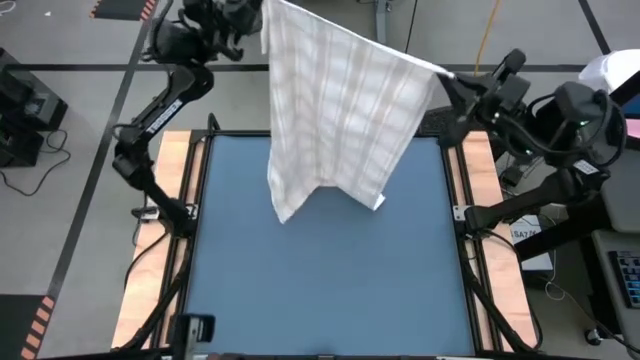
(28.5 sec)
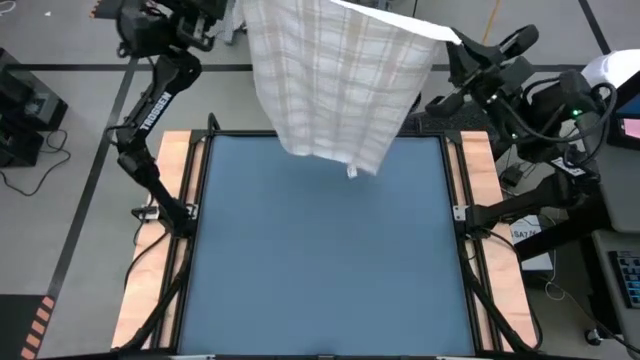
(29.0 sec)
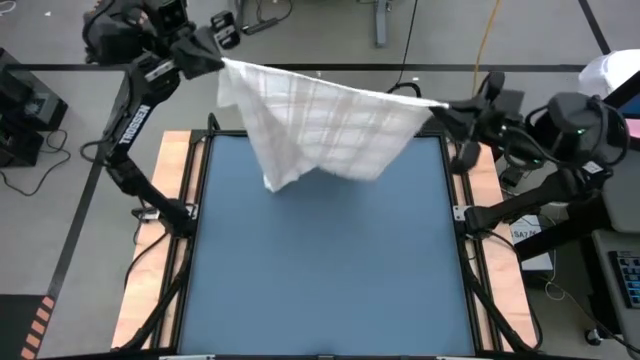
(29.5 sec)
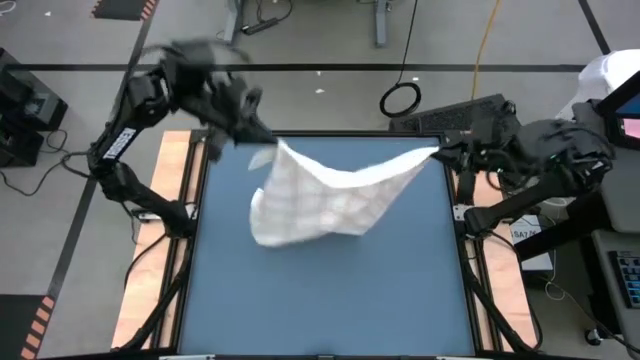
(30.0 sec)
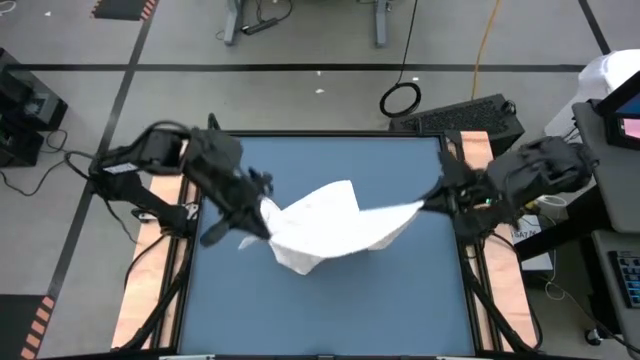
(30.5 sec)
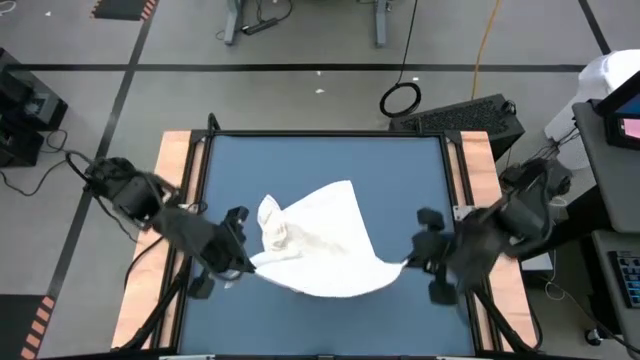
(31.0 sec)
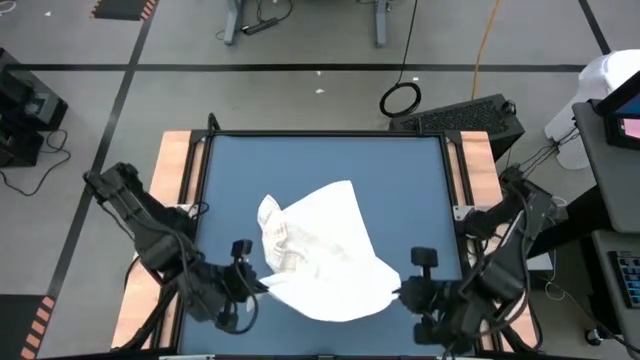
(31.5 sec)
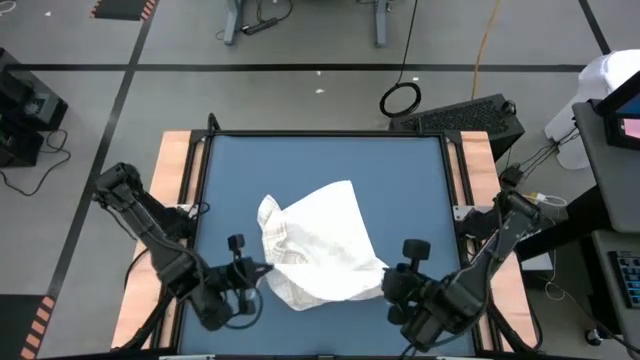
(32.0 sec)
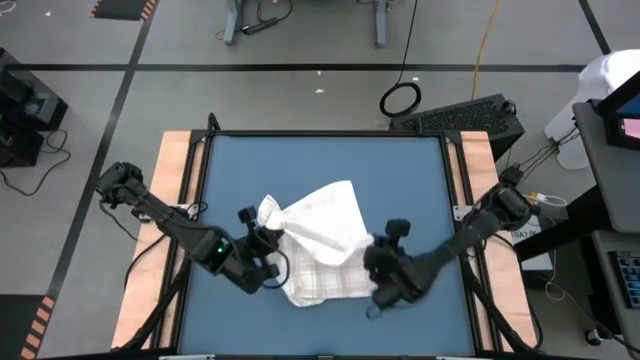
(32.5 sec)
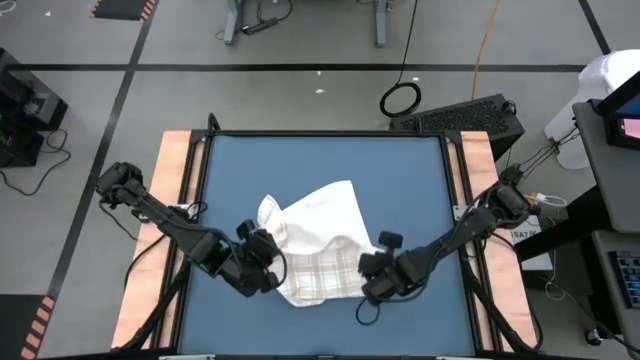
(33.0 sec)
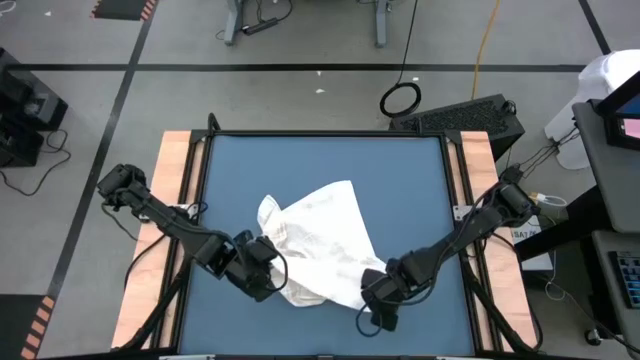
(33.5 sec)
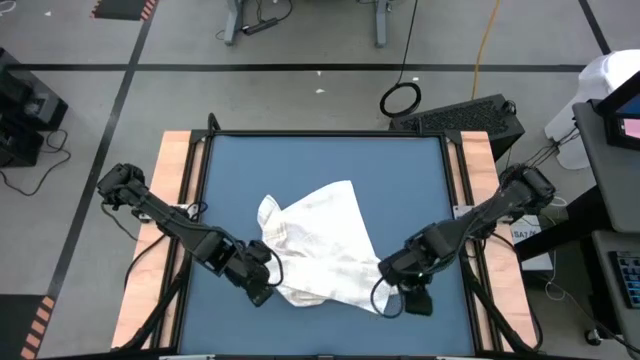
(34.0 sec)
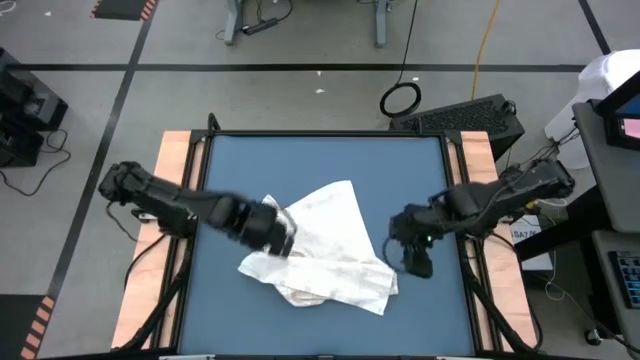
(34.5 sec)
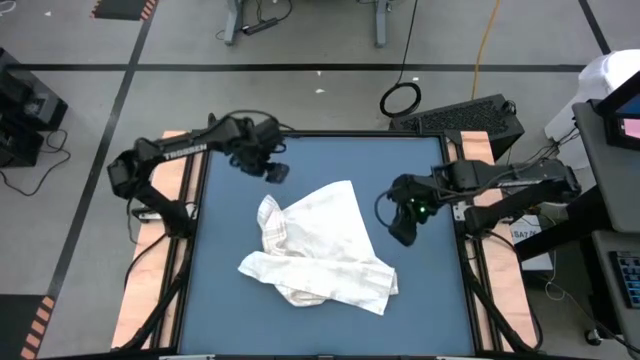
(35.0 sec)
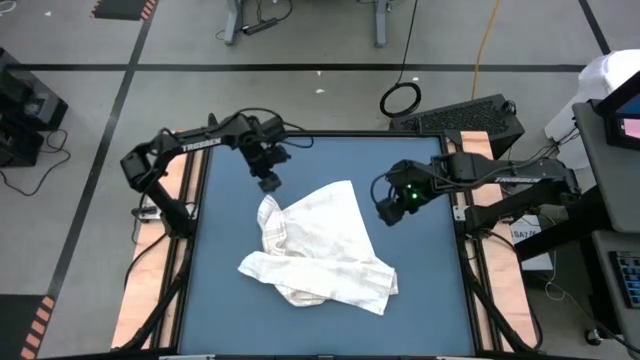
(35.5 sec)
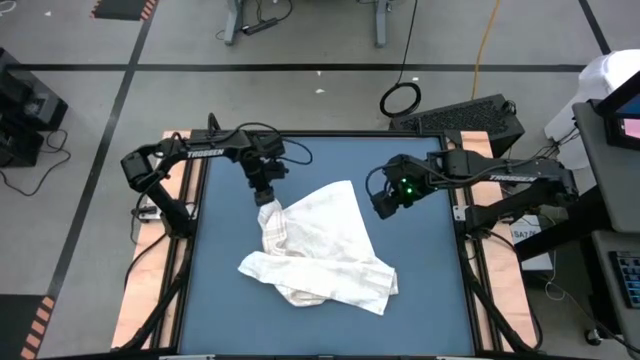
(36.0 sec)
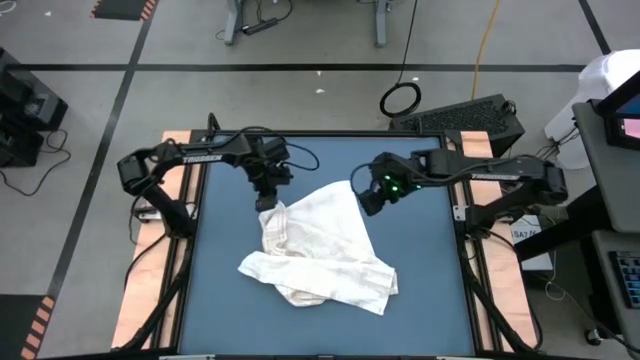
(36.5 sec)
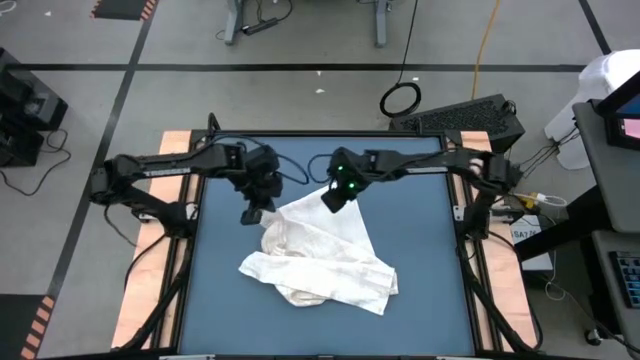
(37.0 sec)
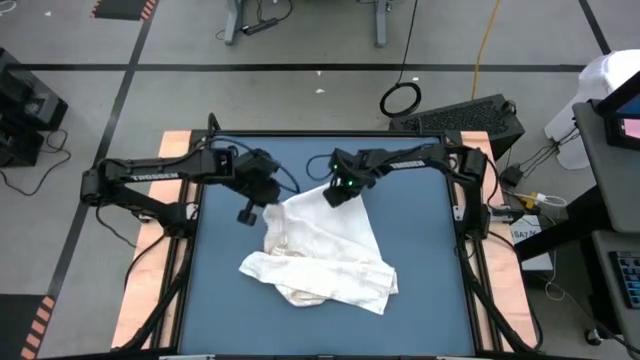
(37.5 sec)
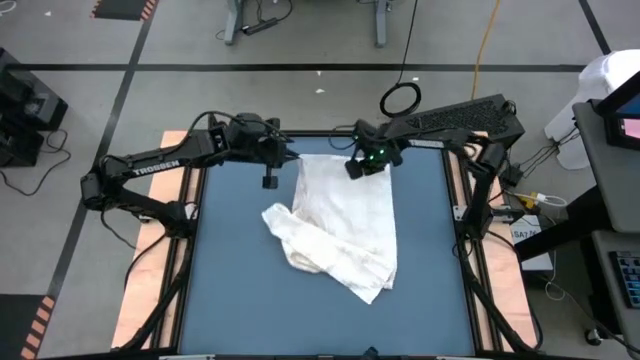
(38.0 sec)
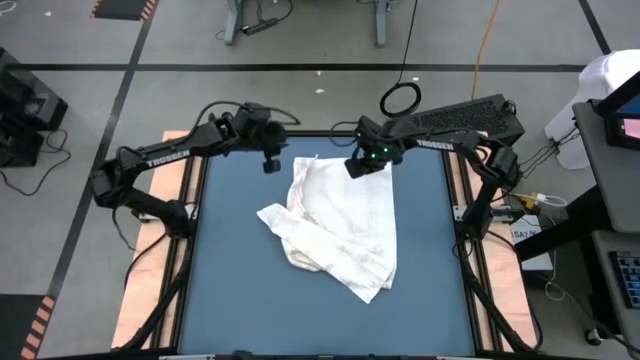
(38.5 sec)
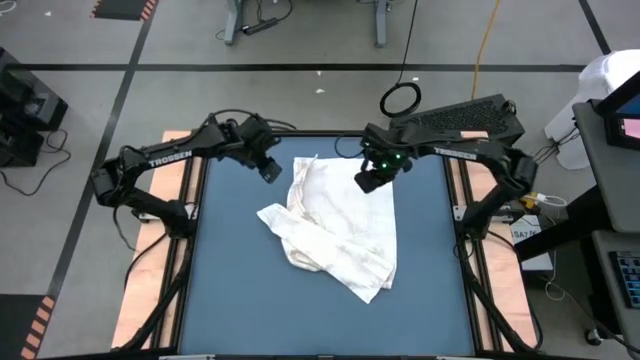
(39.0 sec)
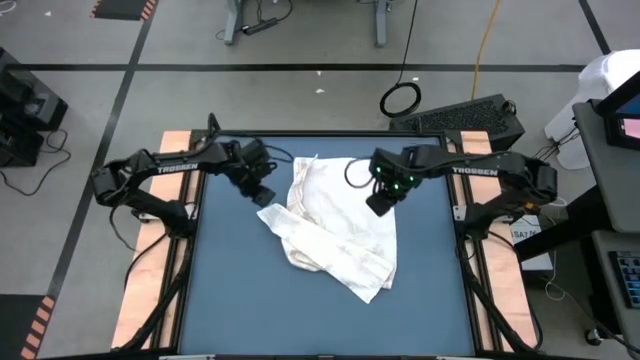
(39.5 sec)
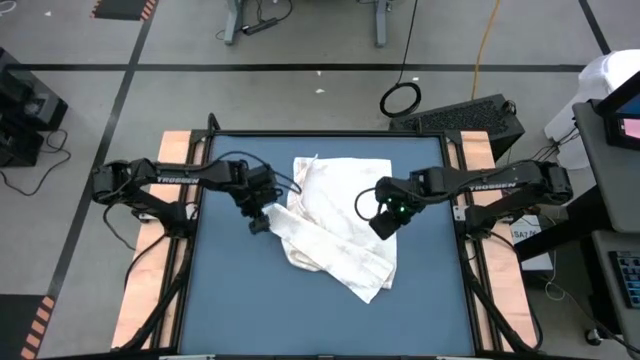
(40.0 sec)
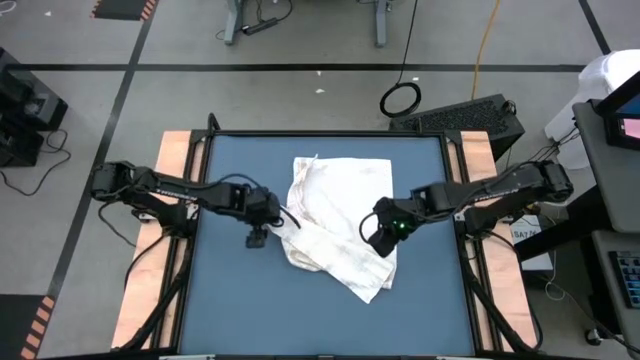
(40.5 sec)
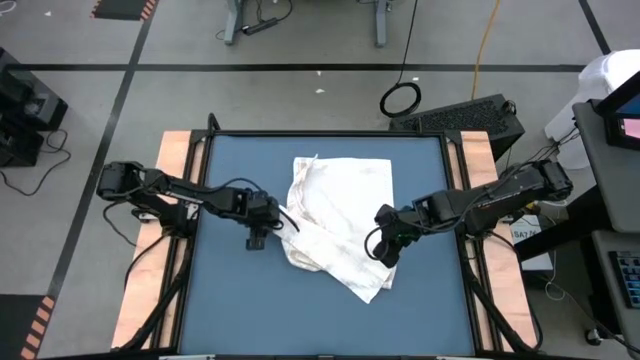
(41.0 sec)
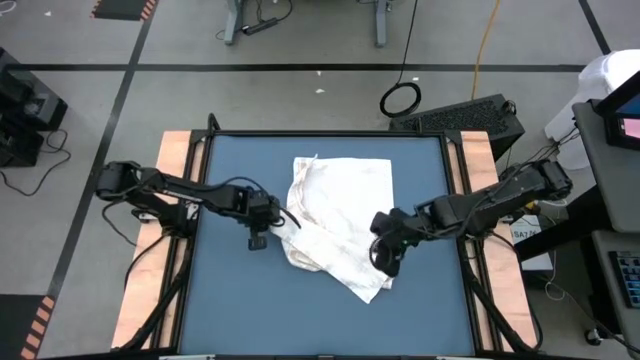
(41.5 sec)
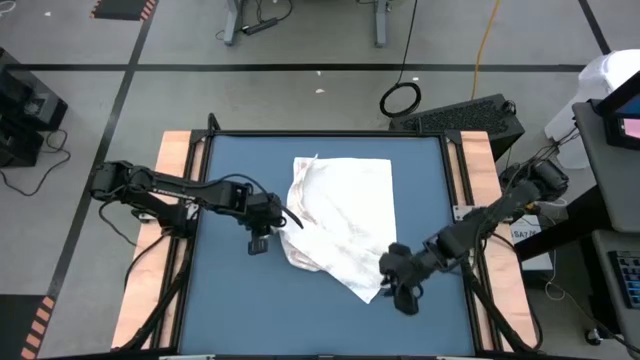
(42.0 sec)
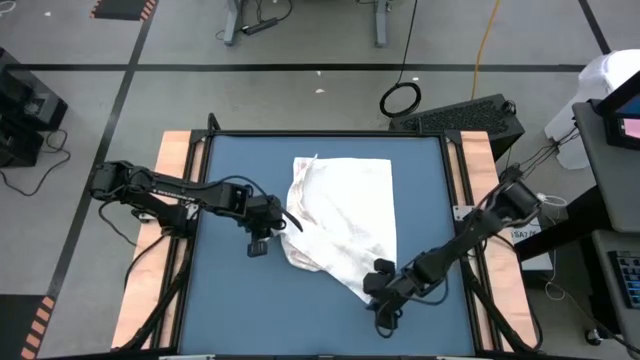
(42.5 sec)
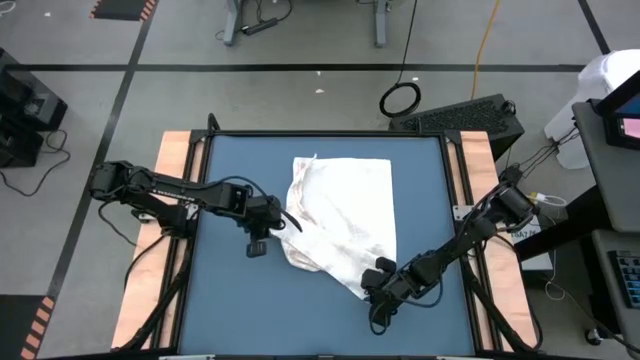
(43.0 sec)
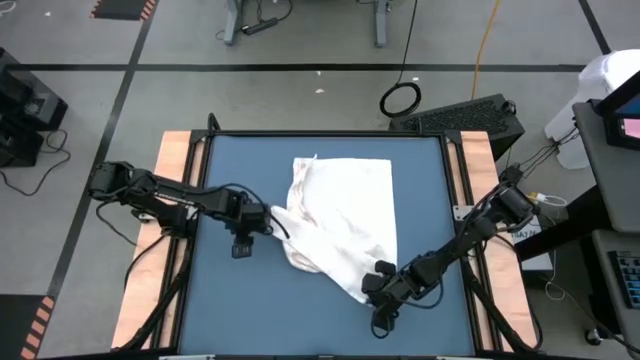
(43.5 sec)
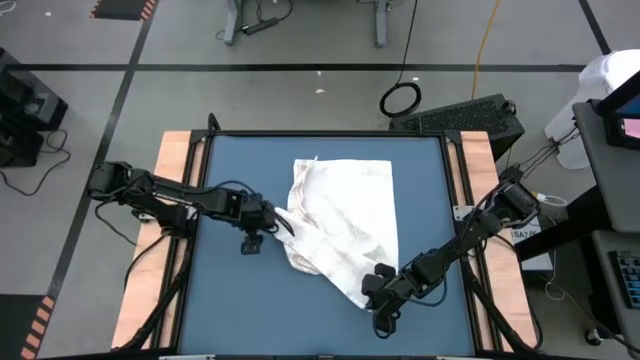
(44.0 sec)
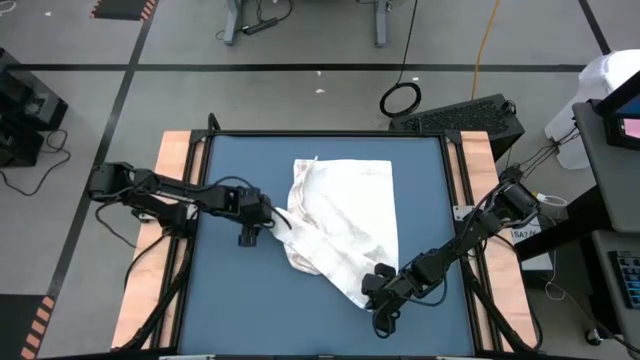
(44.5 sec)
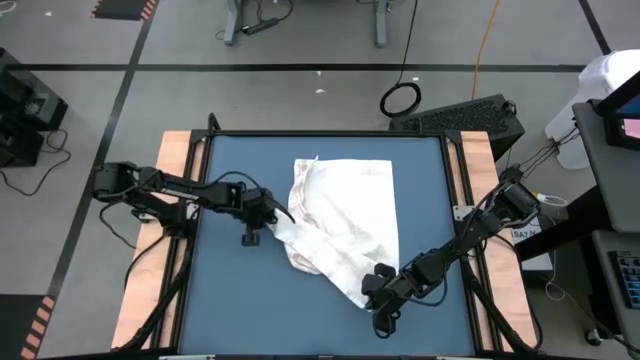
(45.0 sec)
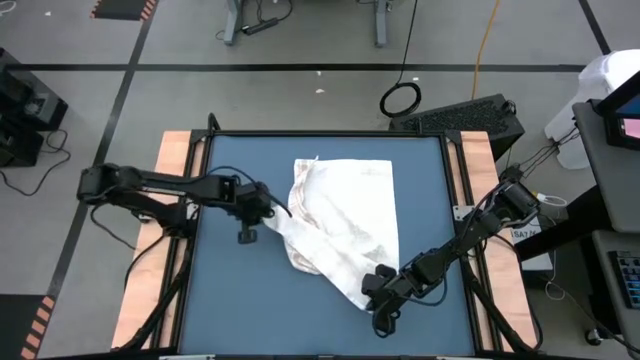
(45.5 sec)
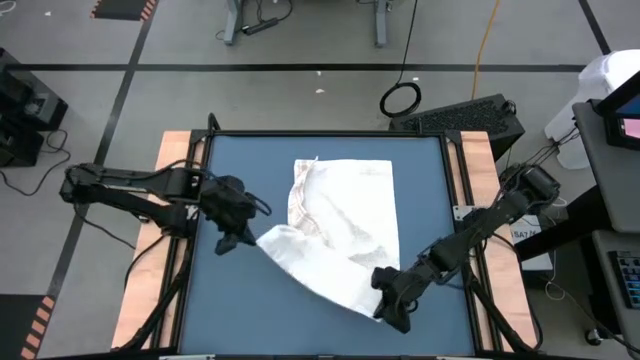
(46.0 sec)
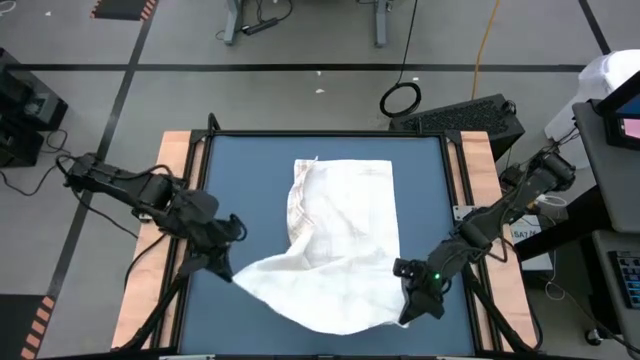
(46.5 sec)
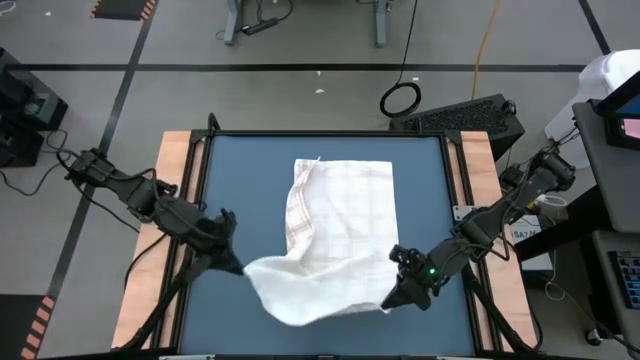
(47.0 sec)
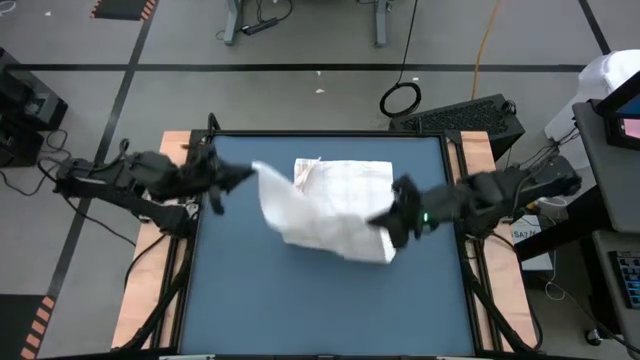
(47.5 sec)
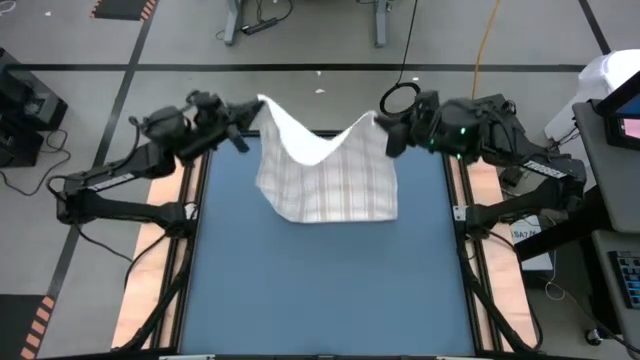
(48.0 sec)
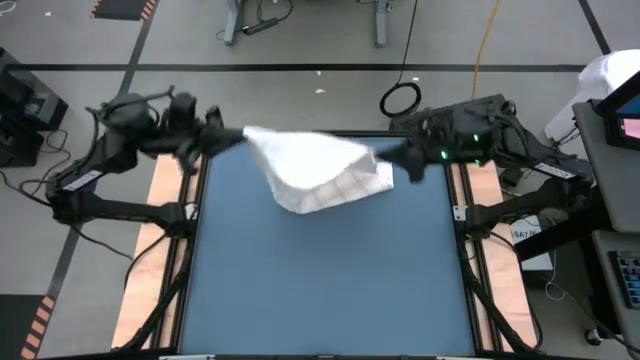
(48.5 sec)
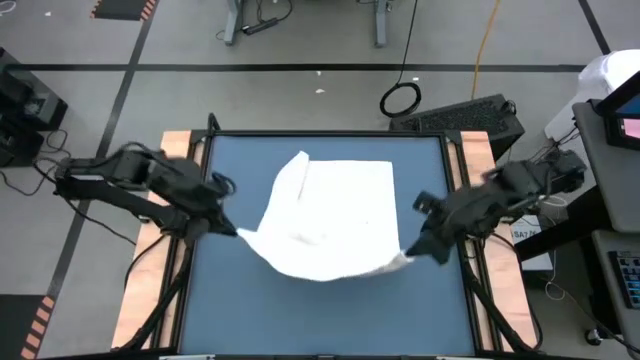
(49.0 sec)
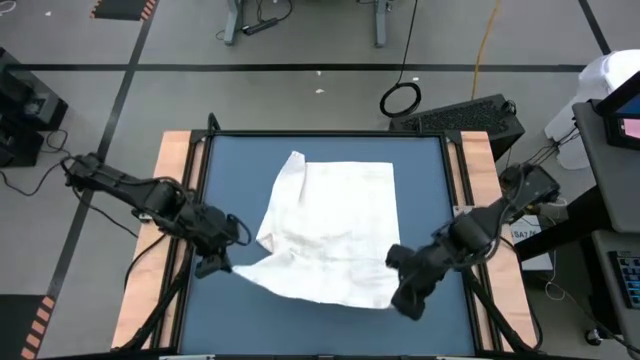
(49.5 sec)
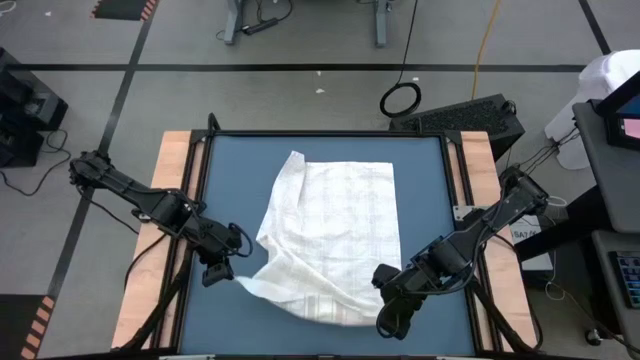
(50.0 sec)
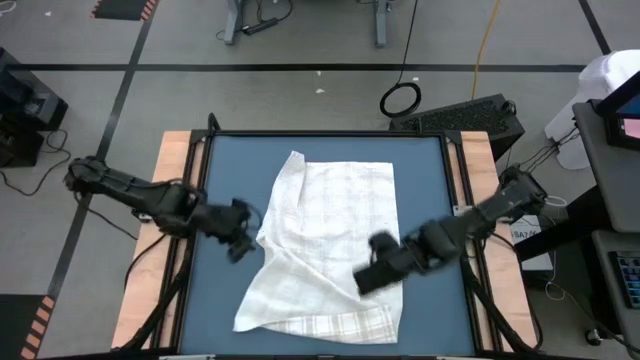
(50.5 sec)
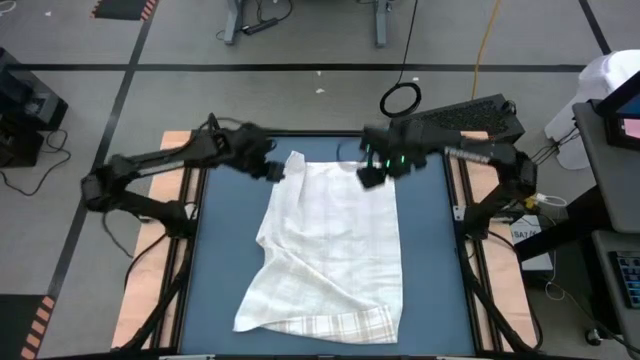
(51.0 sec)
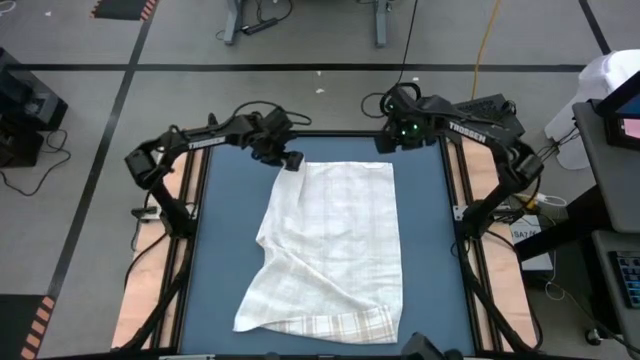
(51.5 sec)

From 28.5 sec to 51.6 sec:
Task: Roll towel
Fold the white towel
